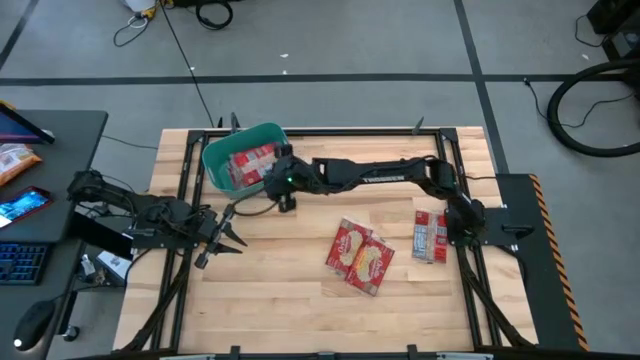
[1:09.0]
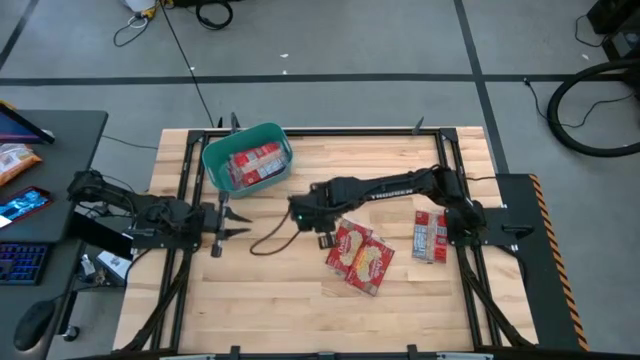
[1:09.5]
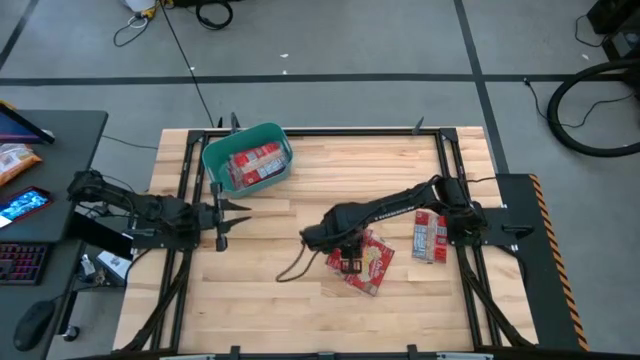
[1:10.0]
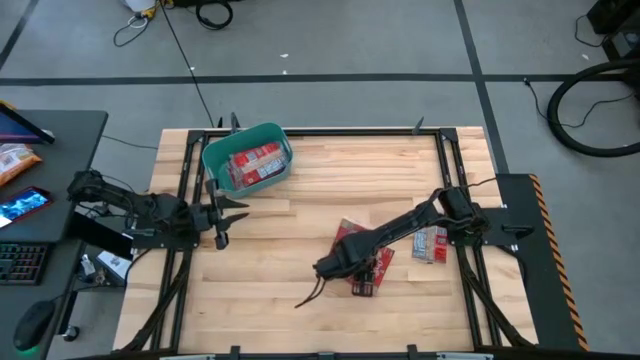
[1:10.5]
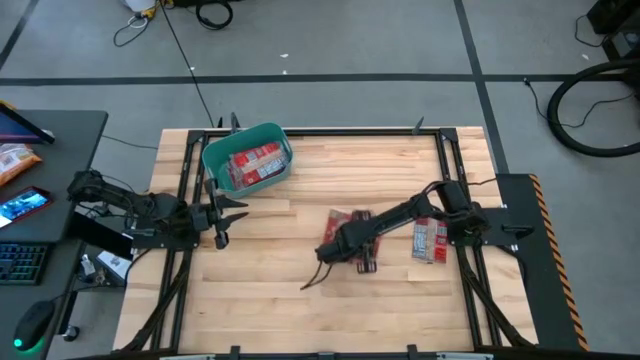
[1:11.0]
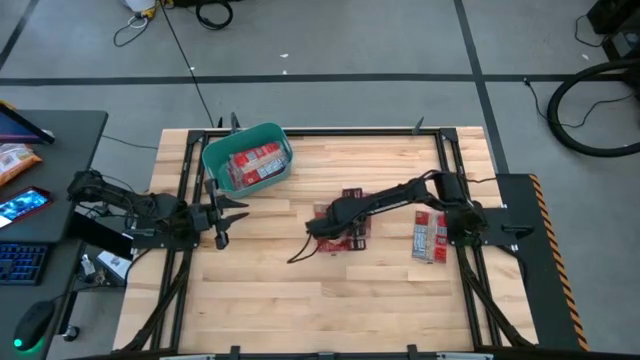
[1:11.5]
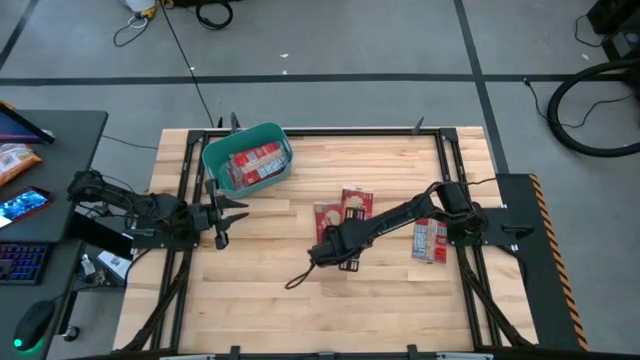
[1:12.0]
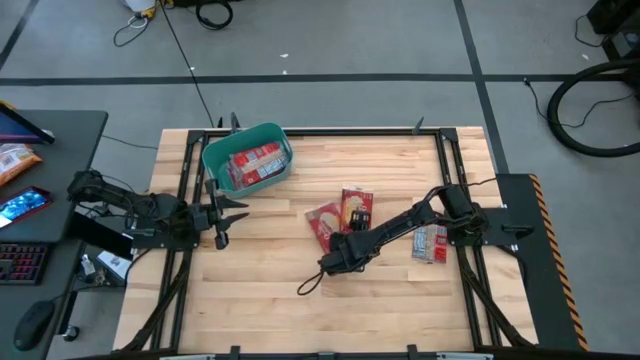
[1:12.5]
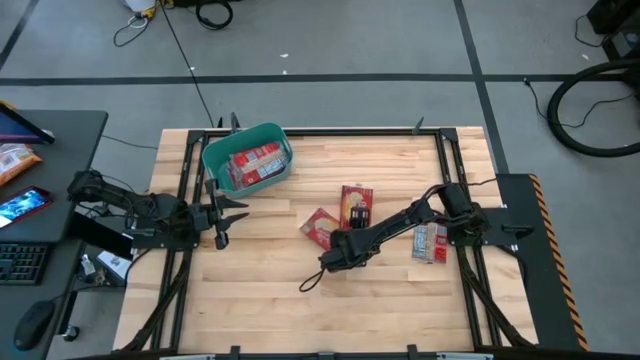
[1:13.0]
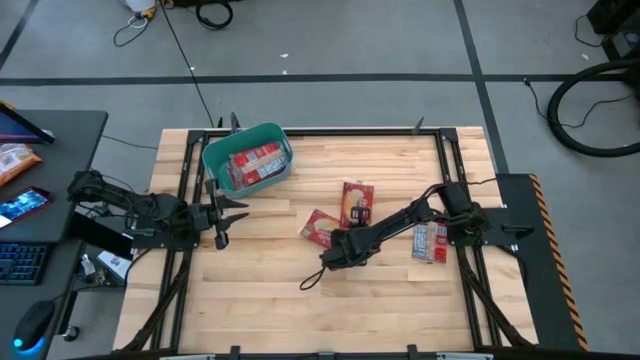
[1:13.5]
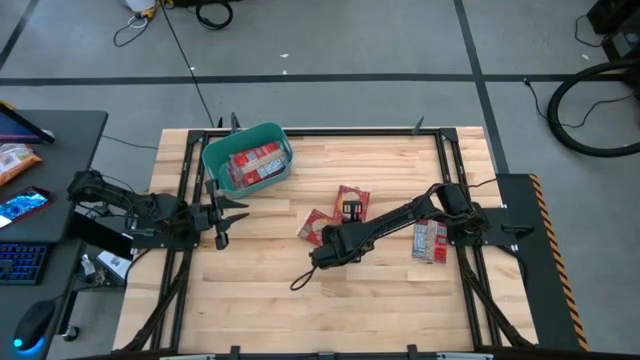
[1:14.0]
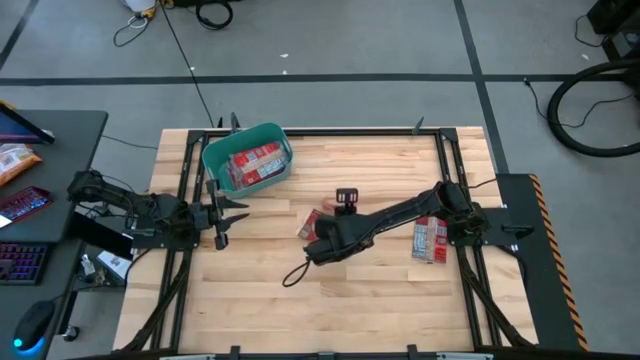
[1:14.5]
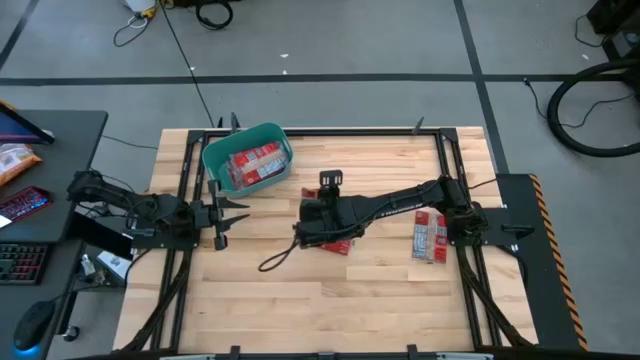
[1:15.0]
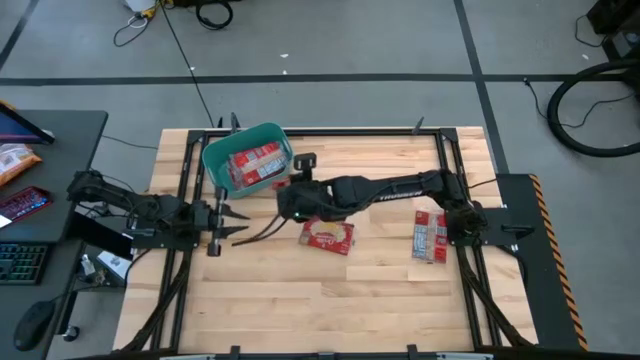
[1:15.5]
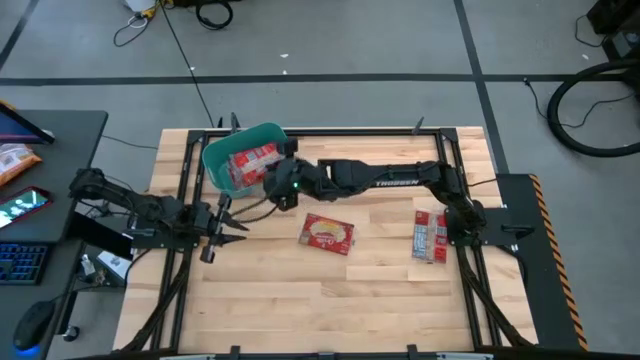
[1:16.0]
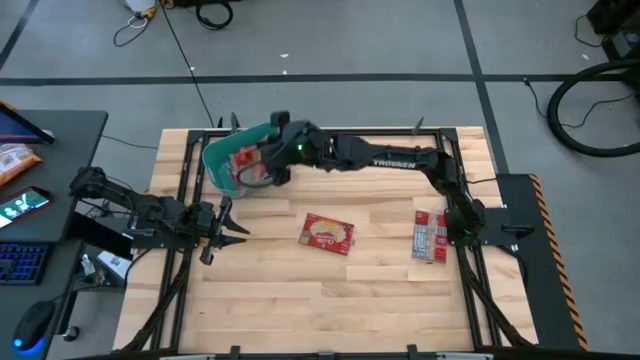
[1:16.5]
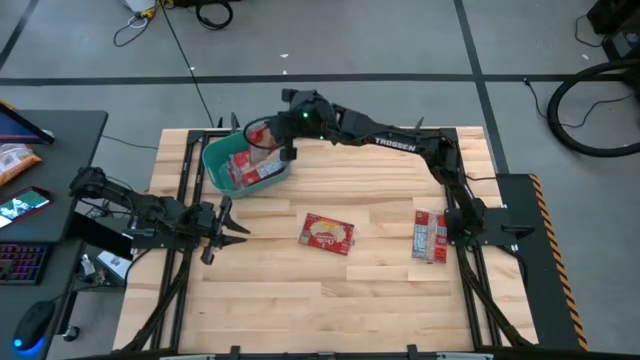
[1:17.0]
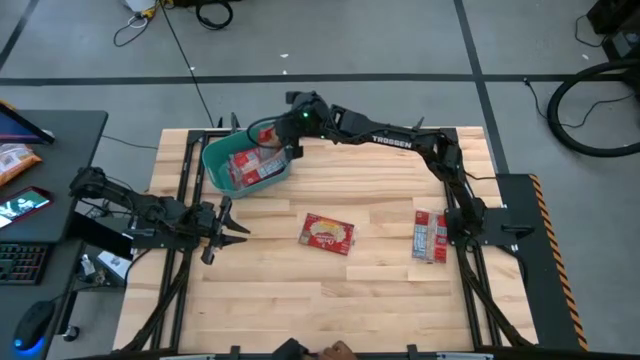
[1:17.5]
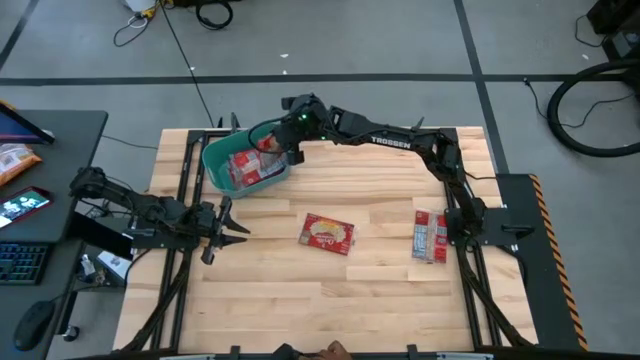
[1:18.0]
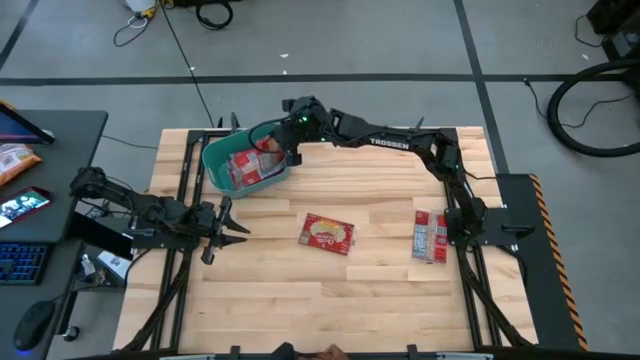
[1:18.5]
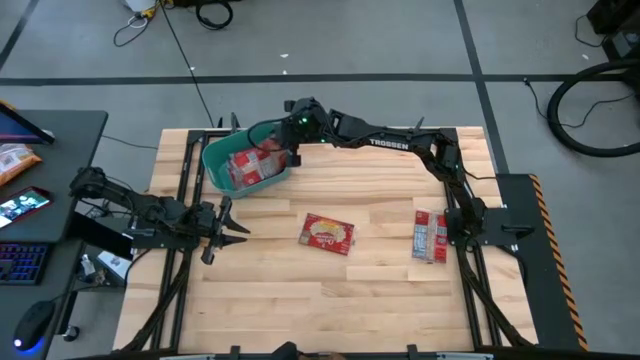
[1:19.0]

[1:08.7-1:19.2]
Task: Sort popcorn bags into baskets
Put the red popcorn bag into the green bin

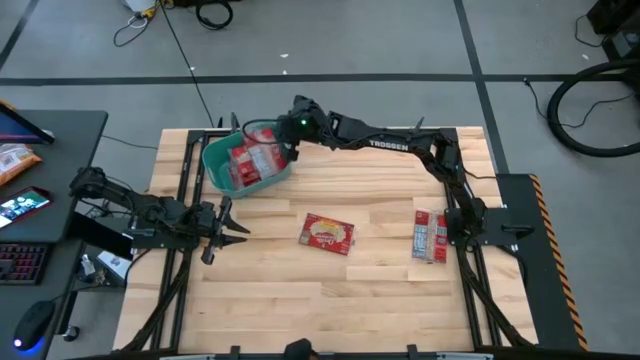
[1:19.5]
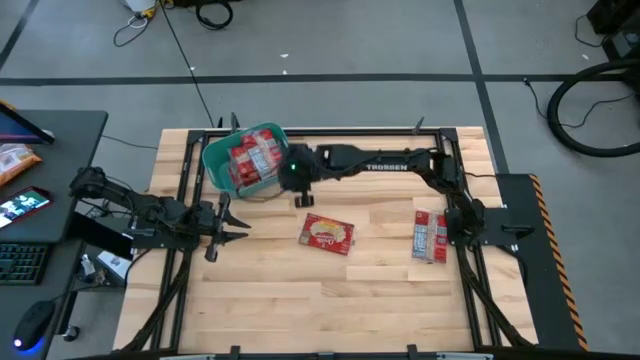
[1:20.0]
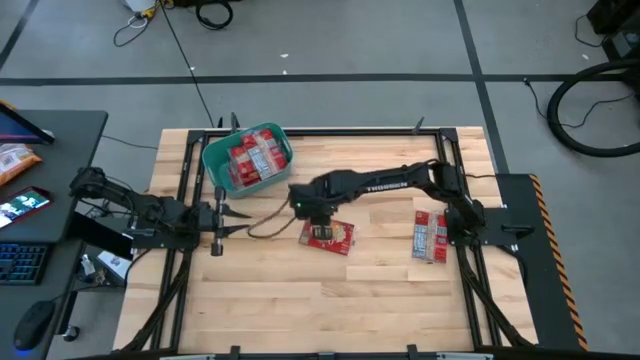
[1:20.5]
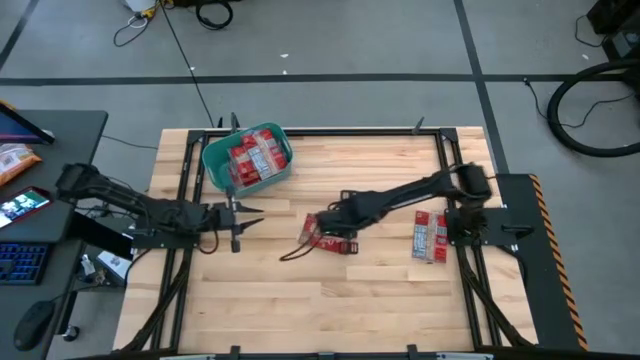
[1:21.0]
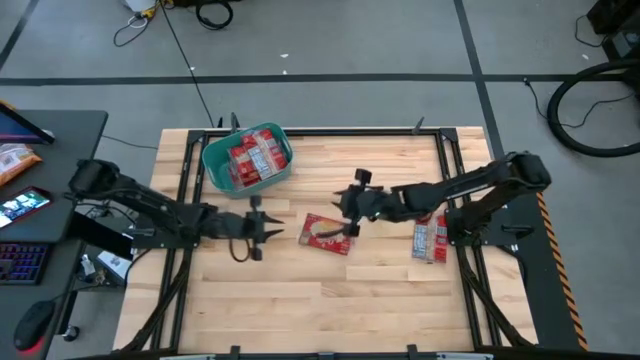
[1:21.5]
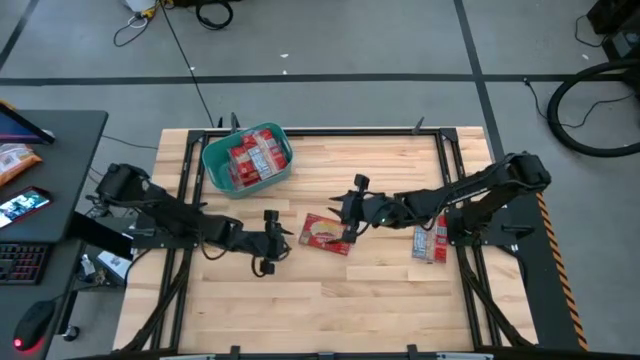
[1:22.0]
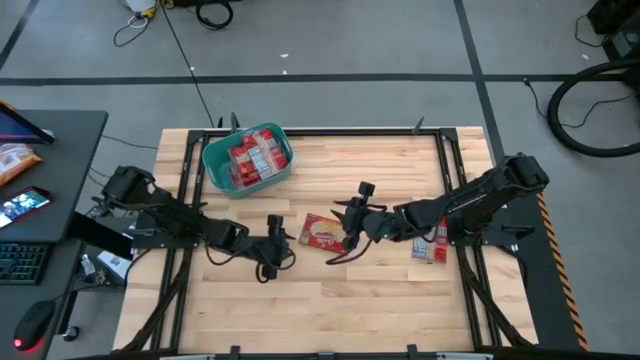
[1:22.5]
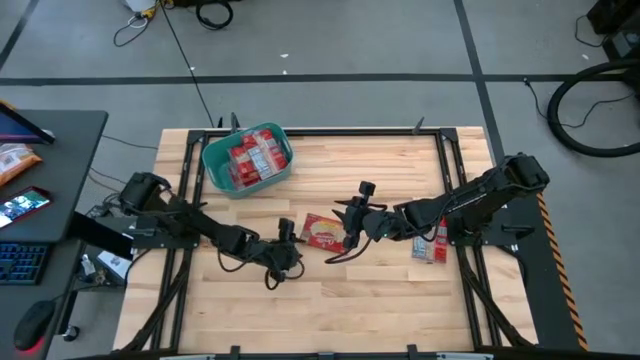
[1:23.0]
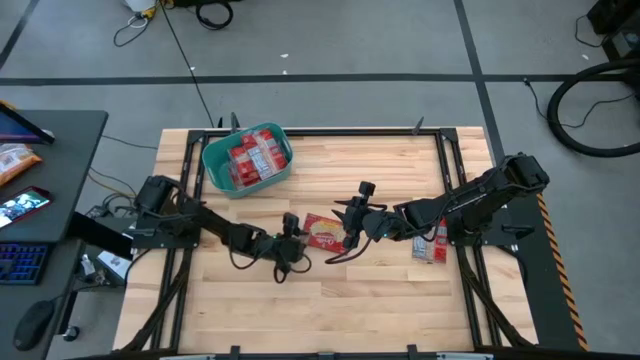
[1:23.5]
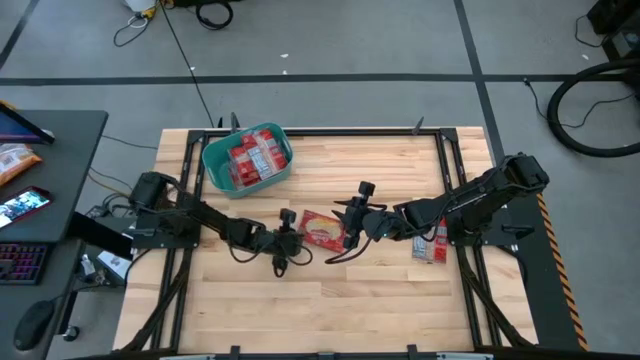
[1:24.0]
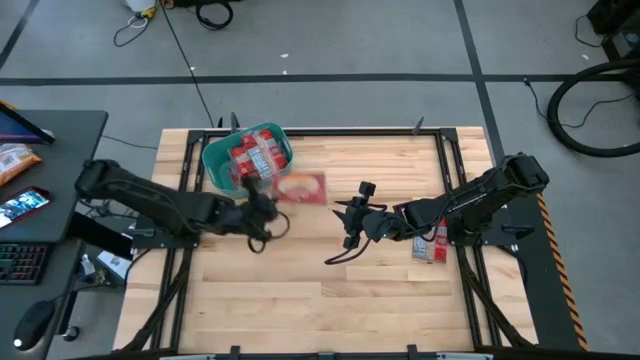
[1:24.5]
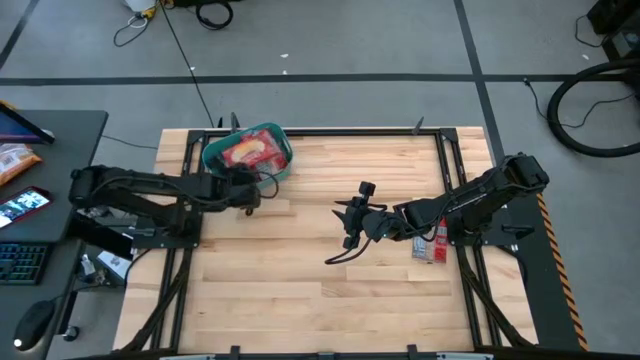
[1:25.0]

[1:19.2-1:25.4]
Put the red popcorn bag into the green bin

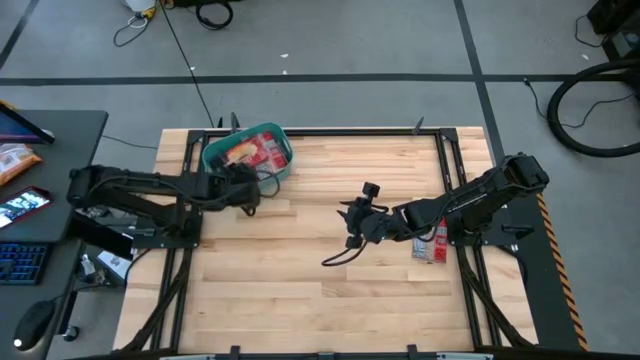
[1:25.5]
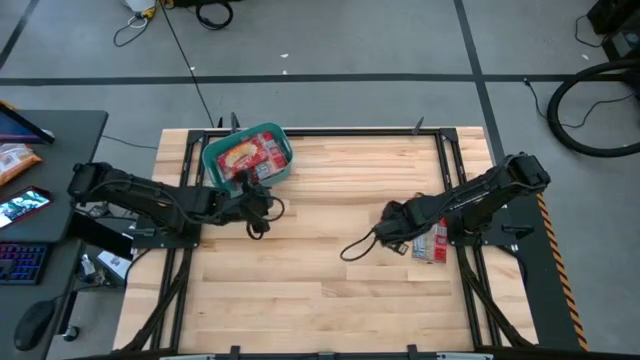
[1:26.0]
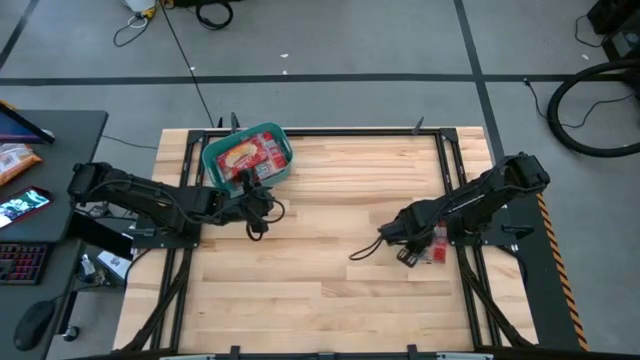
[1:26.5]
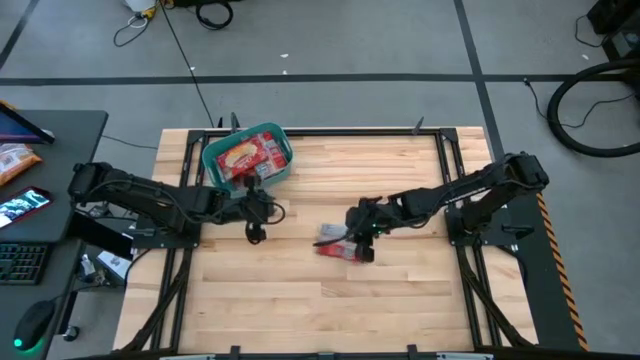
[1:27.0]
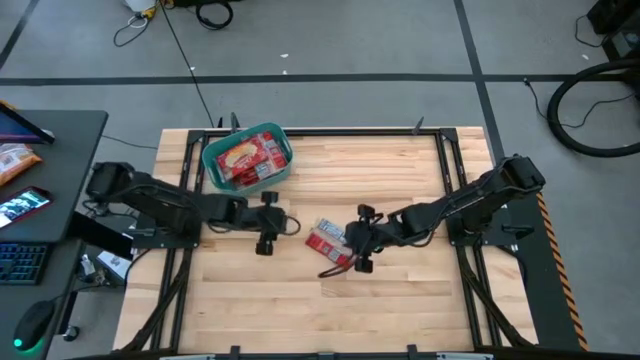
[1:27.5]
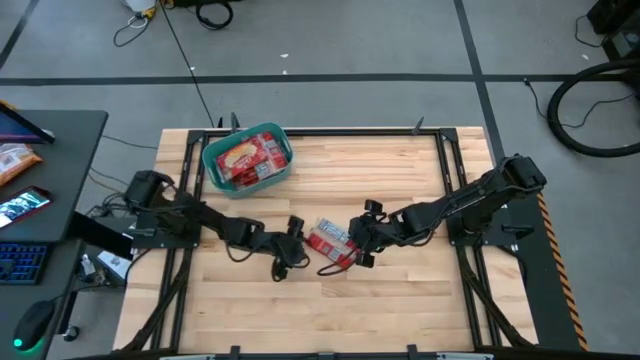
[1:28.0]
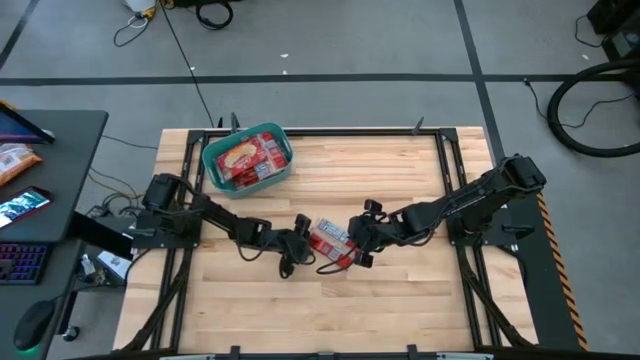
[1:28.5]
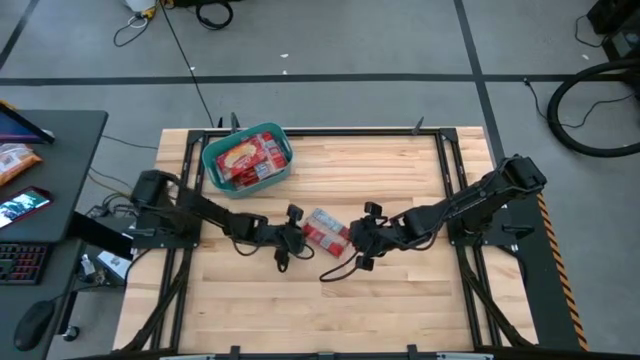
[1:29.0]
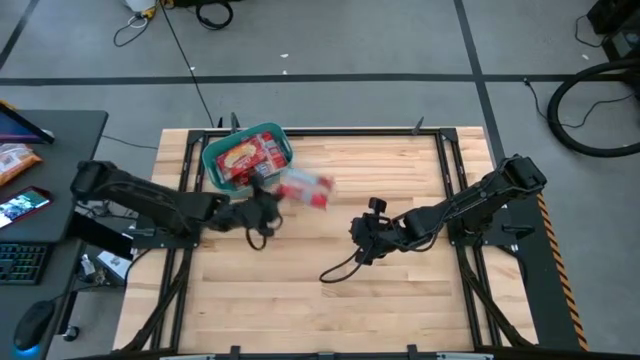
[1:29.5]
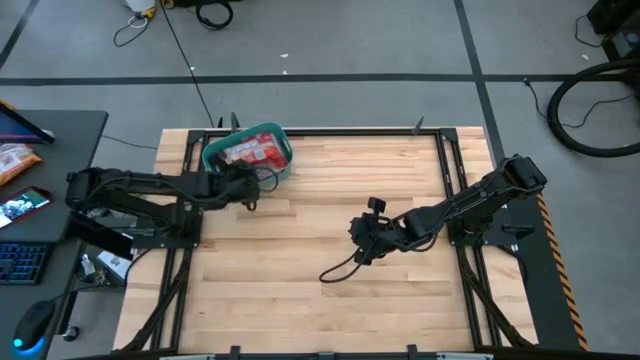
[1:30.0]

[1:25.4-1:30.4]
Put the red popcorn bag into the green bin

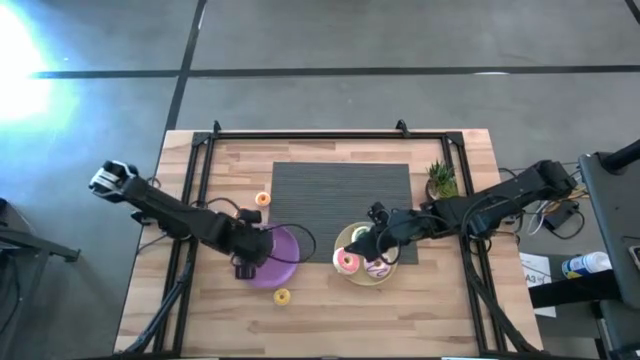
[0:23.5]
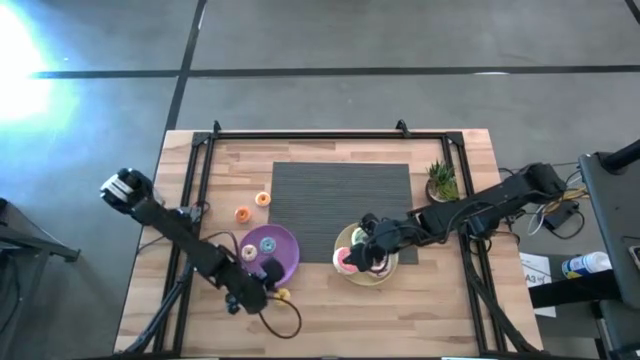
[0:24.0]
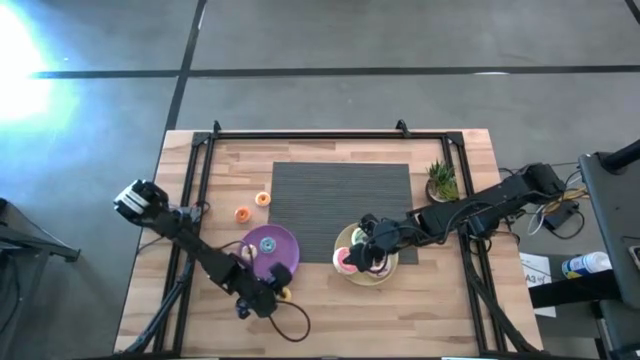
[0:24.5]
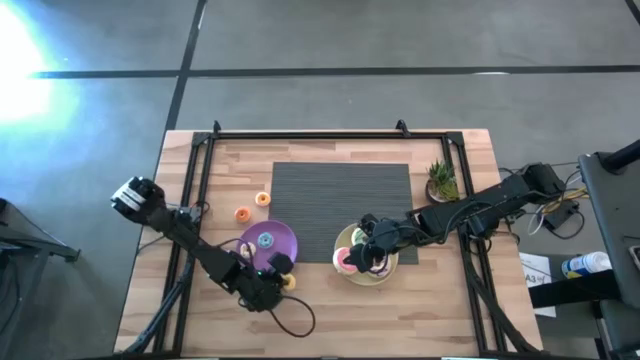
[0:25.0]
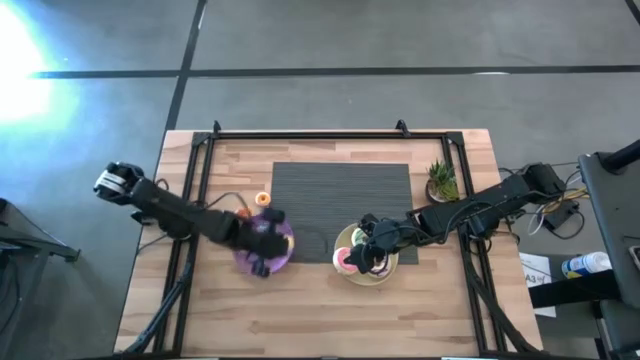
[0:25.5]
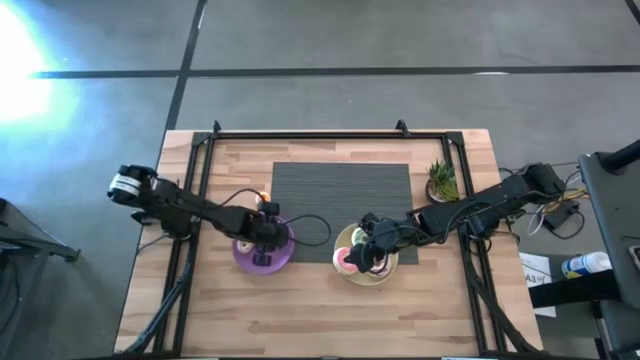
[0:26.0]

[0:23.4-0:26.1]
Task: Pick & Place donuts
Put the small yellow donut on the violet plate
